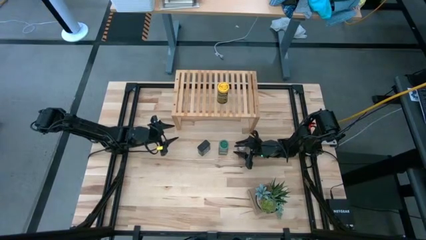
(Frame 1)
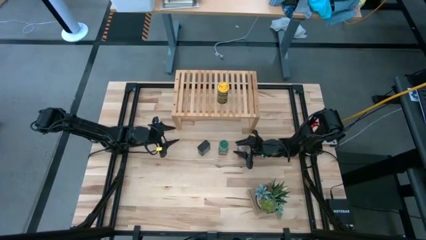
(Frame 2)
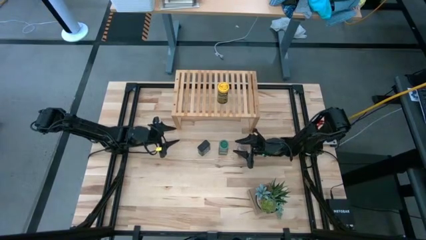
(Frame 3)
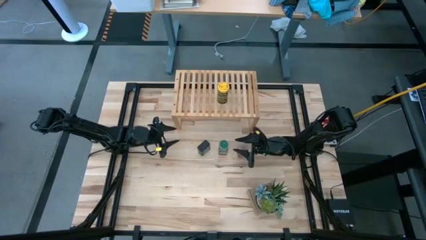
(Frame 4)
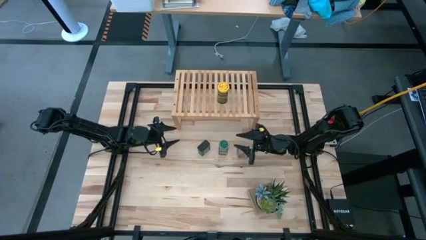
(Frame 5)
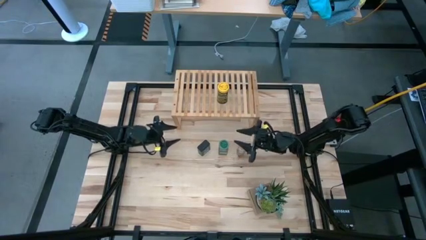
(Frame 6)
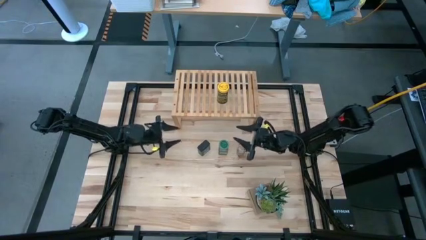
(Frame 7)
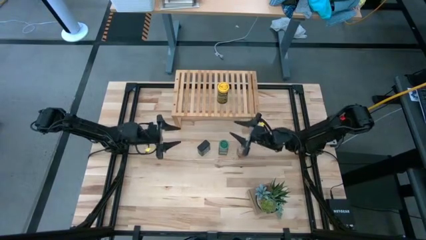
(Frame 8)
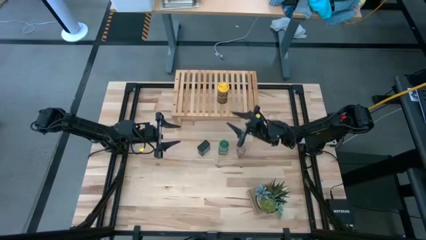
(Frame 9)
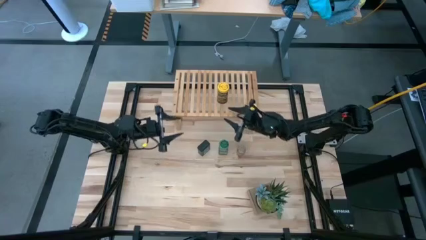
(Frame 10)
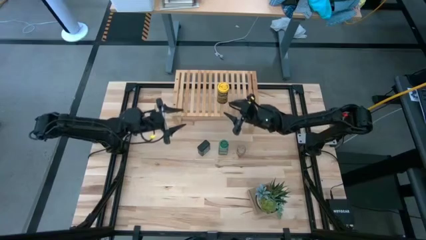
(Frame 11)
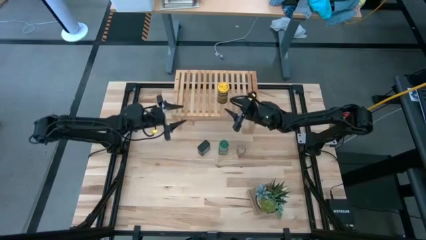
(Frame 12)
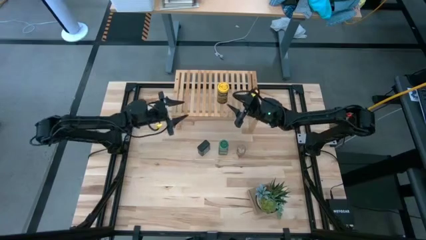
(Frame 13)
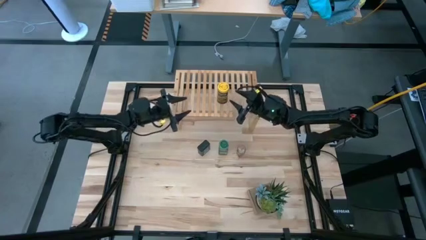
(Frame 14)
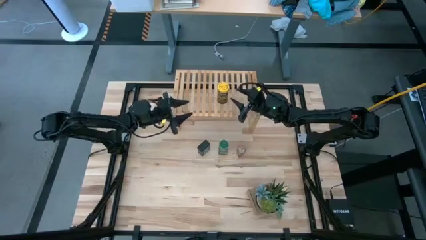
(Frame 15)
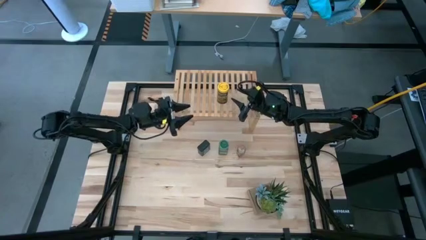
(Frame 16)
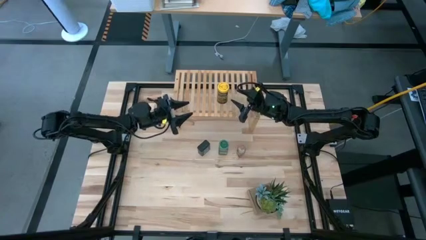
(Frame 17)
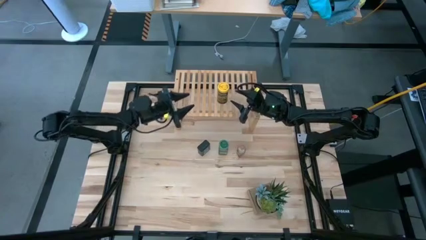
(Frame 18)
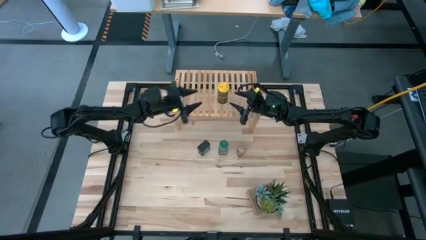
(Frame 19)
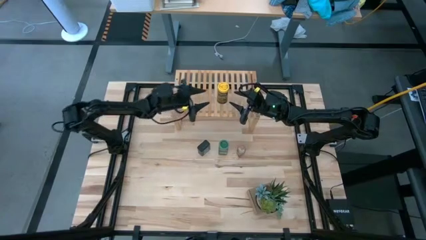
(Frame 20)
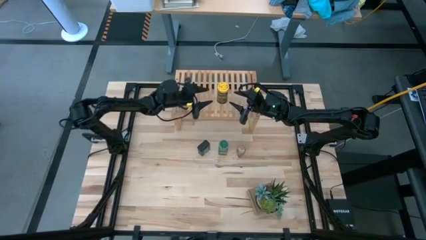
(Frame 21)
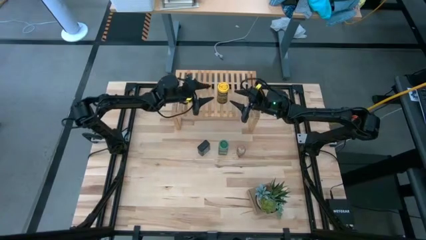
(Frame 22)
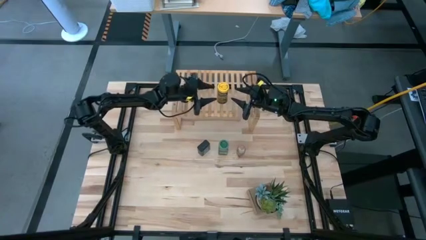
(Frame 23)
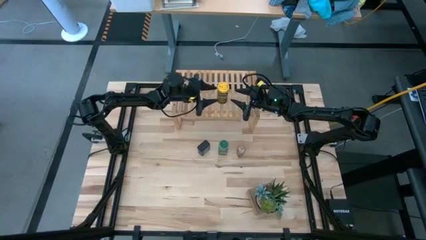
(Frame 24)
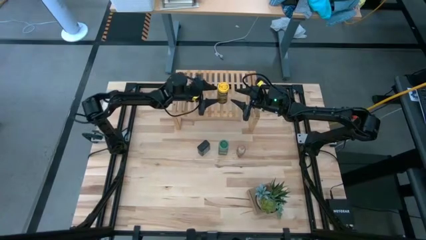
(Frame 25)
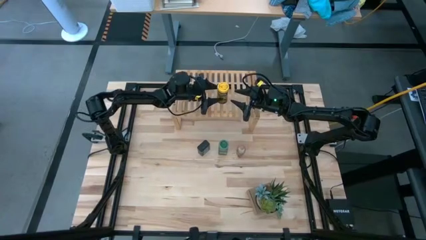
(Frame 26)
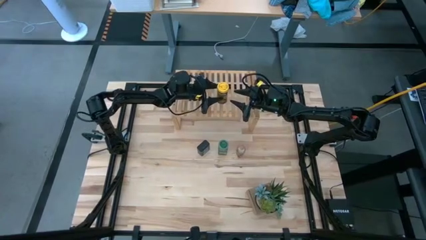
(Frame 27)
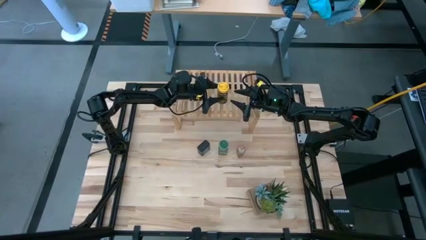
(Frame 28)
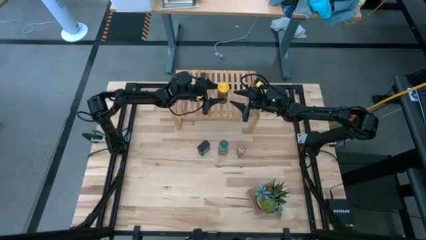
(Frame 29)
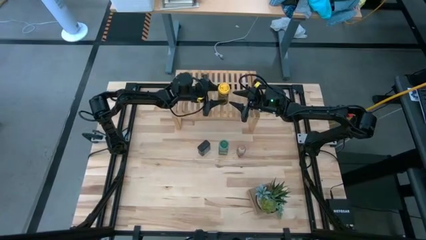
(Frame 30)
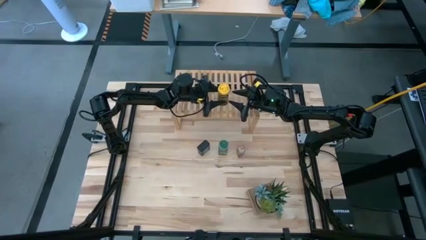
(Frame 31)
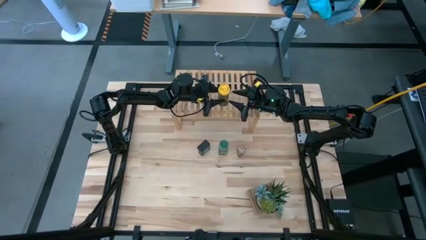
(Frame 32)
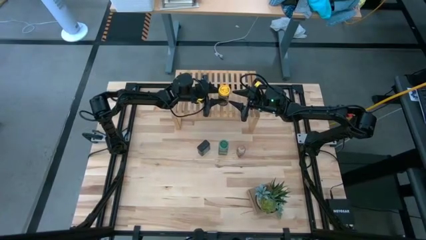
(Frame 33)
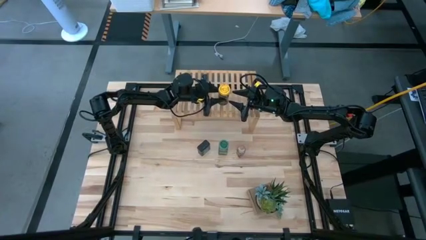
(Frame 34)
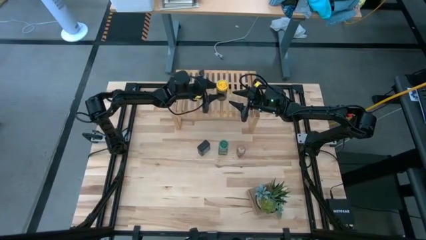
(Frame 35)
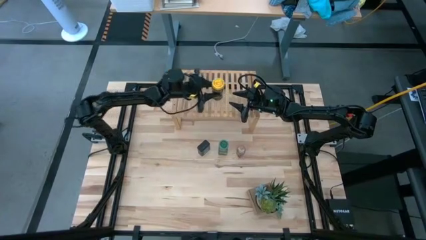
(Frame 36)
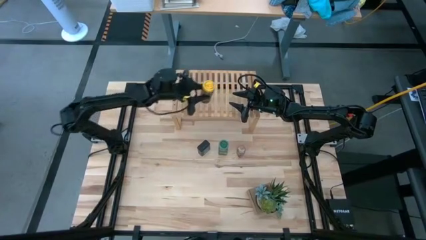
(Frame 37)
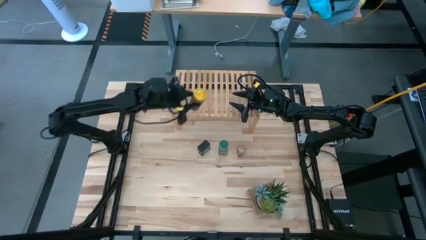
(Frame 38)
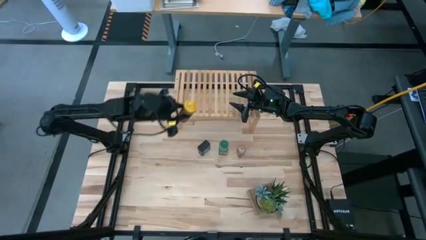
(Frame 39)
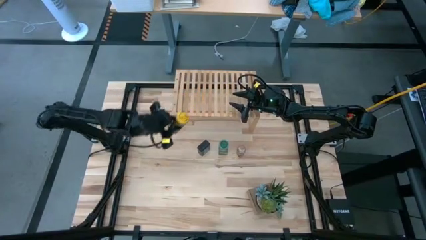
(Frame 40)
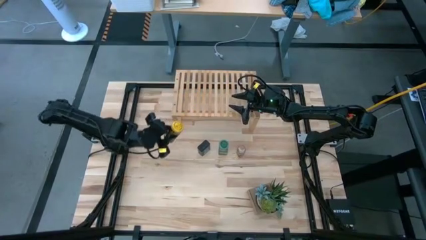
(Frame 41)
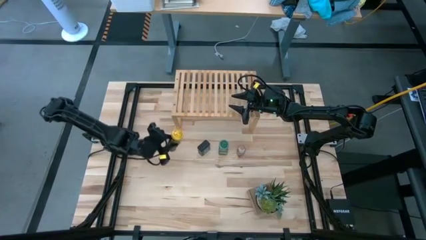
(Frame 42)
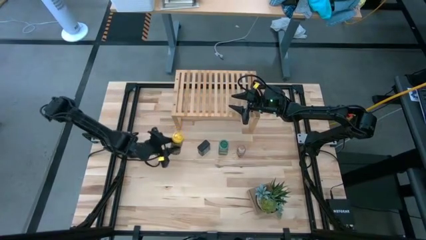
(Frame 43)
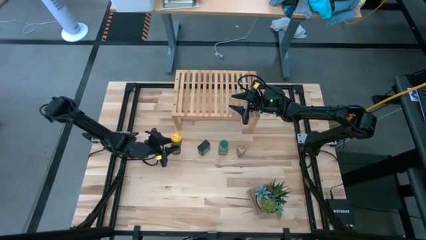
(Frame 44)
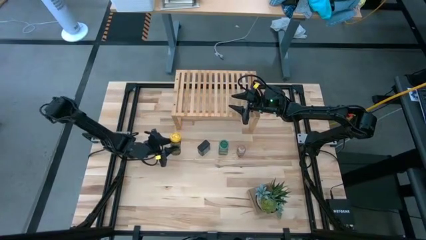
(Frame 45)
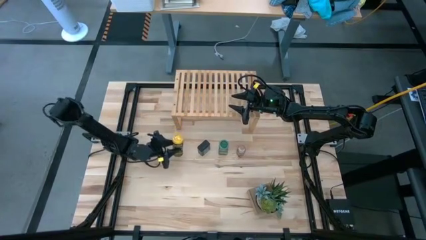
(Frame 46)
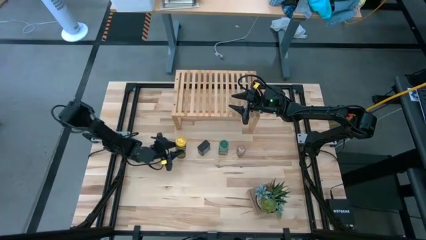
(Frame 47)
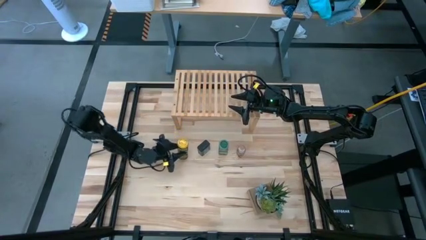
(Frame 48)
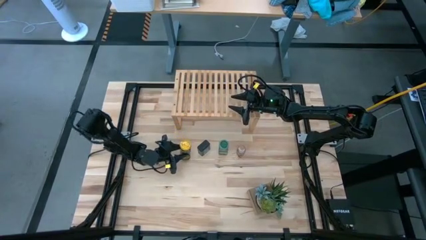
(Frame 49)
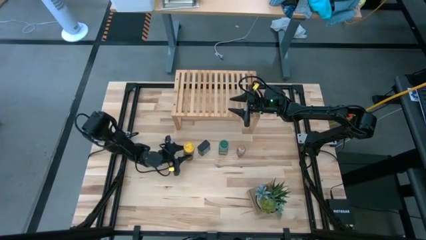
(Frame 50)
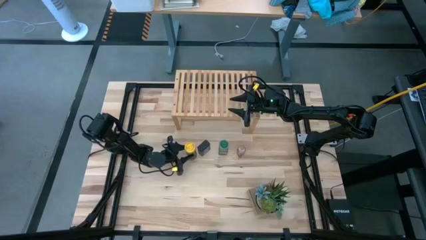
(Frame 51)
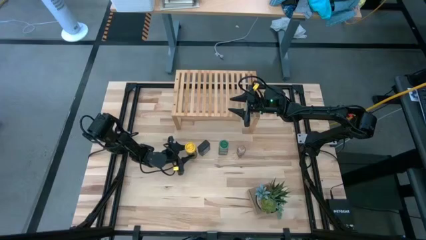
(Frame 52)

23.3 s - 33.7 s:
Task: Shelf spices
Remove the yellow seasoning from the shelf

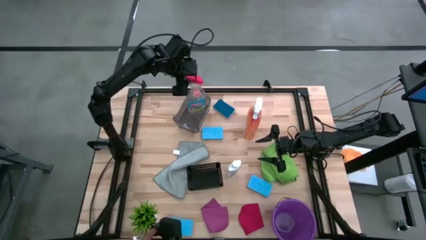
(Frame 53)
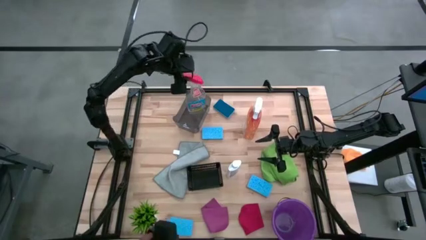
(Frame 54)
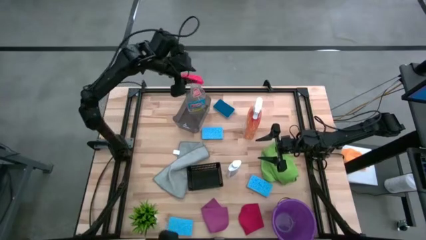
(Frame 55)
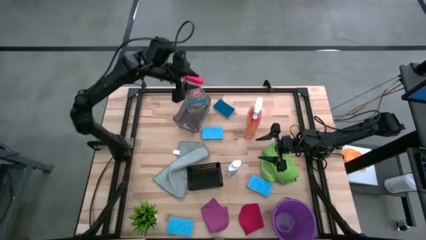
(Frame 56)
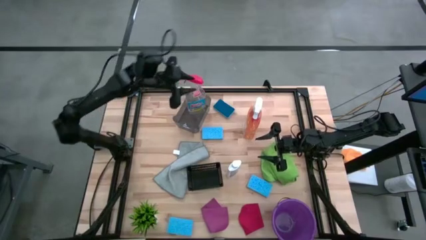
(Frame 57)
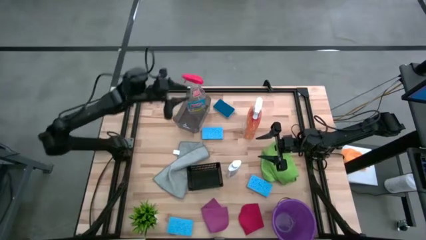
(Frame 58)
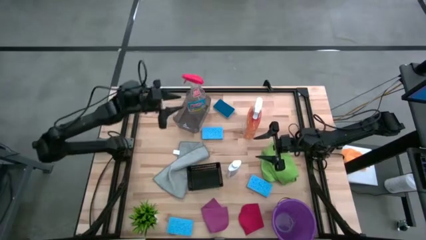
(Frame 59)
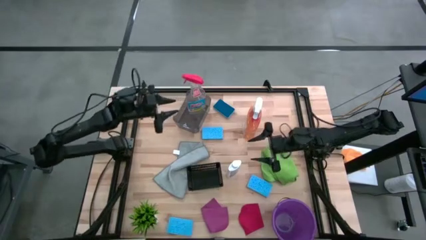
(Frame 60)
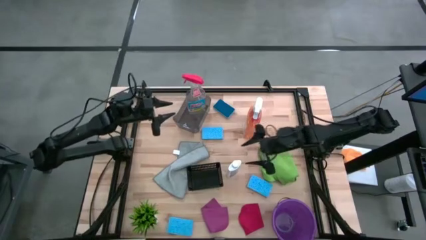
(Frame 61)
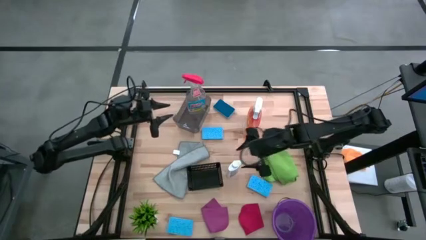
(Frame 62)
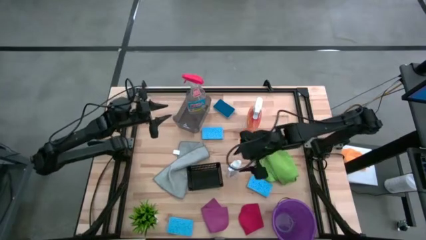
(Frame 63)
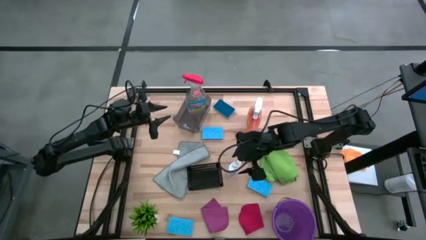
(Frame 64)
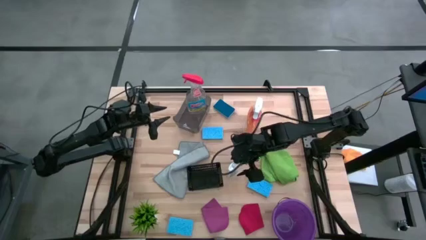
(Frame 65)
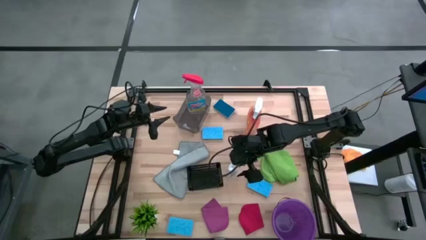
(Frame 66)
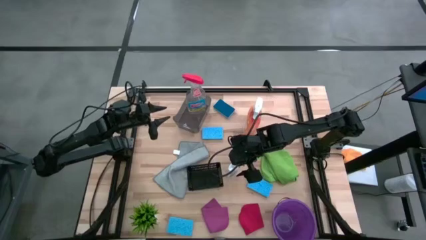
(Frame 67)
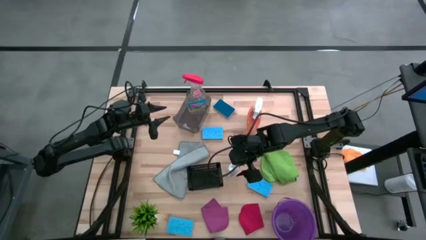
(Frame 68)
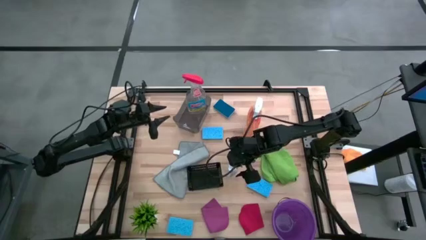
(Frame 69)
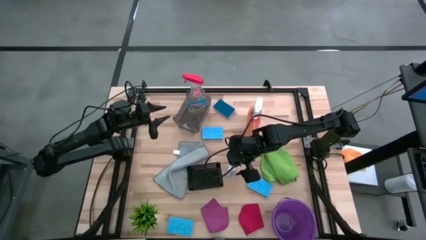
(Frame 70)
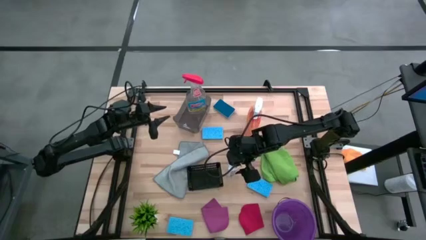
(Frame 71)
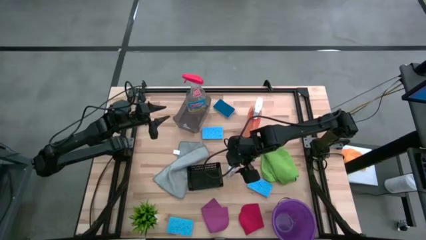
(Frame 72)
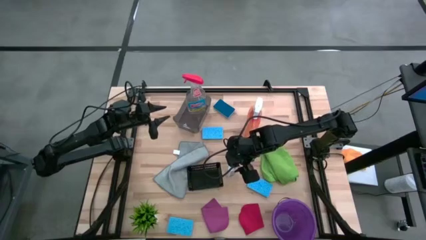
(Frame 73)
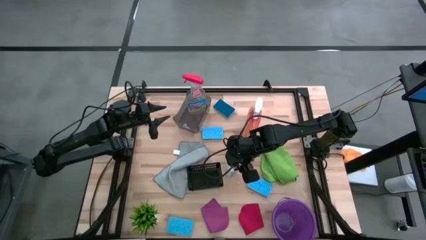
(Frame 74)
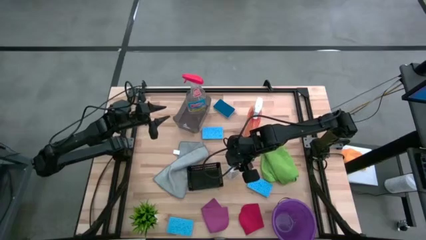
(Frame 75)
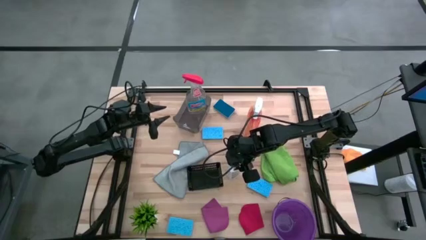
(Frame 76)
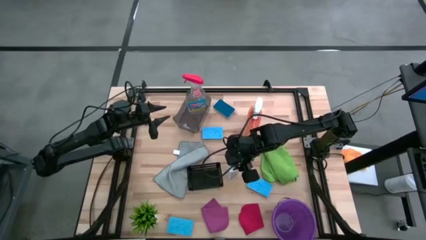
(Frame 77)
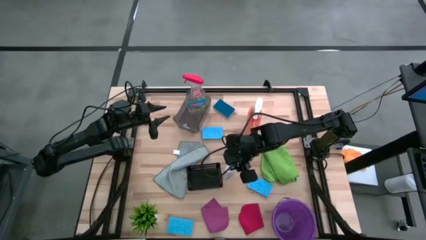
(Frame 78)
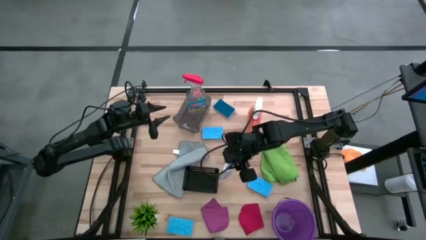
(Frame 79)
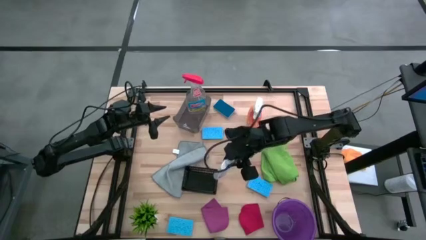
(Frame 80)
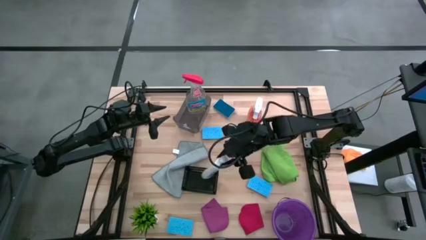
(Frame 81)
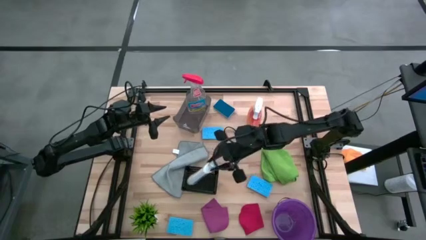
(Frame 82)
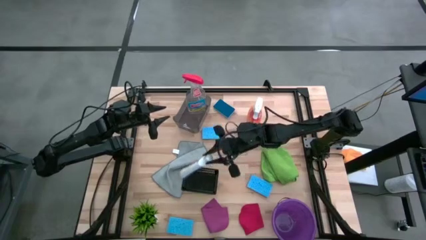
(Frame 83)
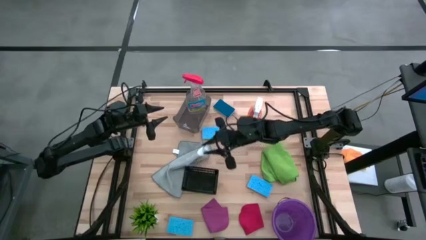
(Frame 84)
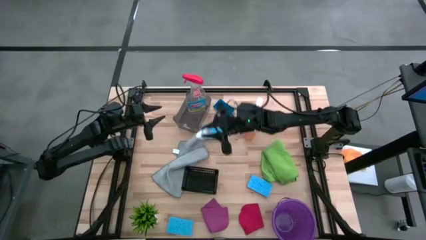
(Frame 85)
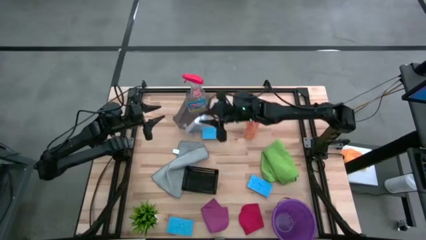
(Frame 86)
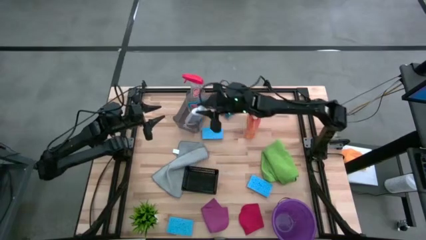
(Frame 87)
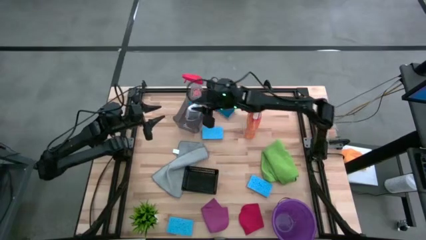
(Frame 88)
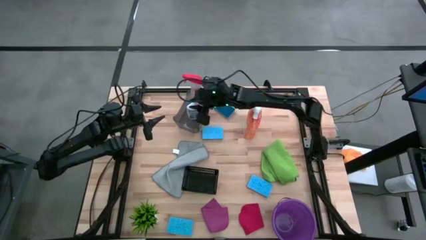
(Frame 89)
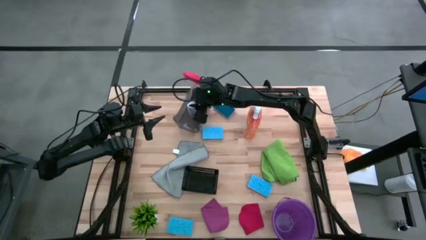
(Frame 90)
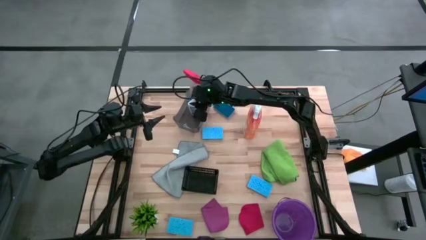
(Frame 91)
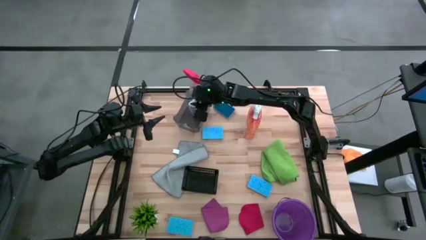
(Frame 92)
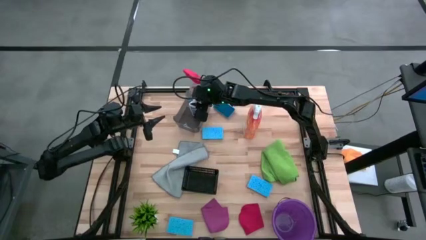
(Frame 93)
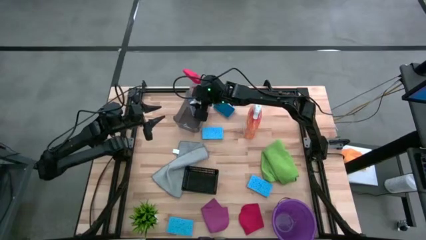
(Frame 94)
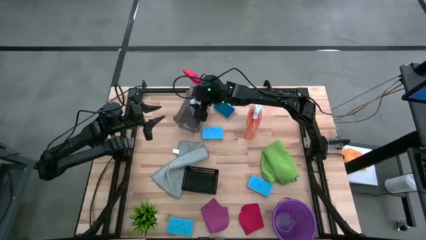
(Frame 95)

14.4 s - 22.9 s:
Task: Pick & Place Kitchen Items
Put the white plastic restorer bottle into the gray bin
